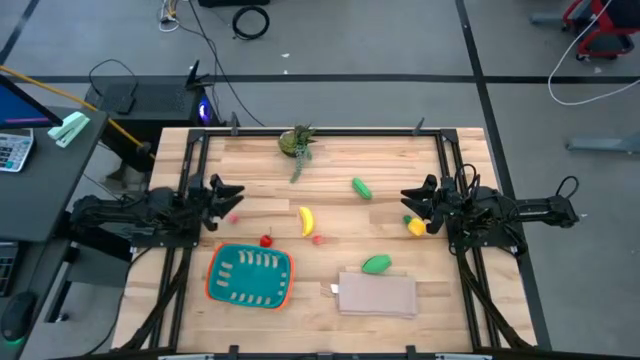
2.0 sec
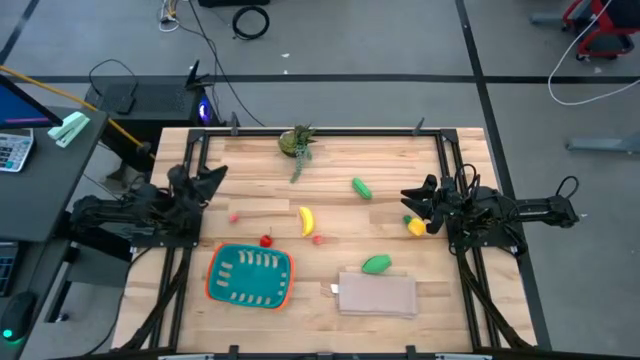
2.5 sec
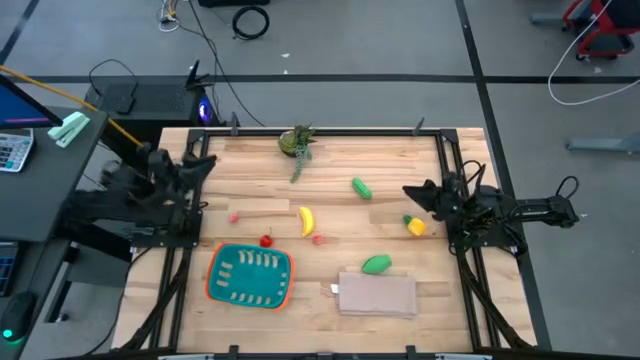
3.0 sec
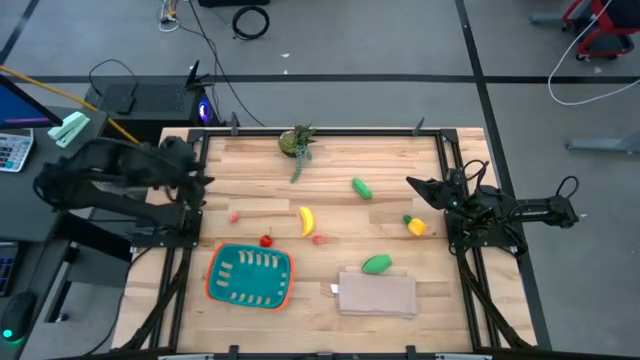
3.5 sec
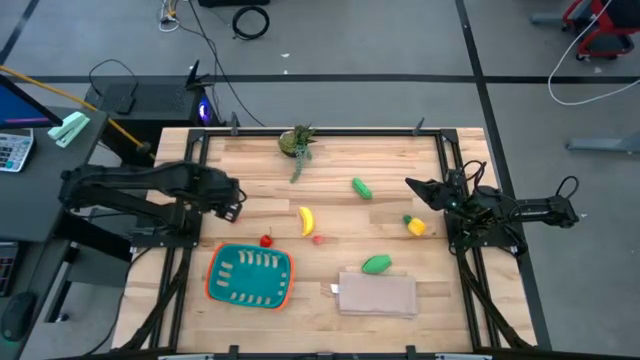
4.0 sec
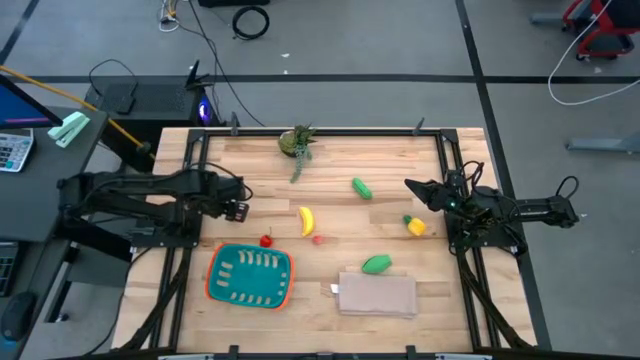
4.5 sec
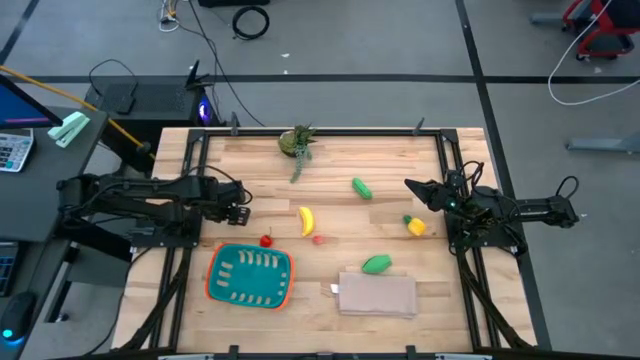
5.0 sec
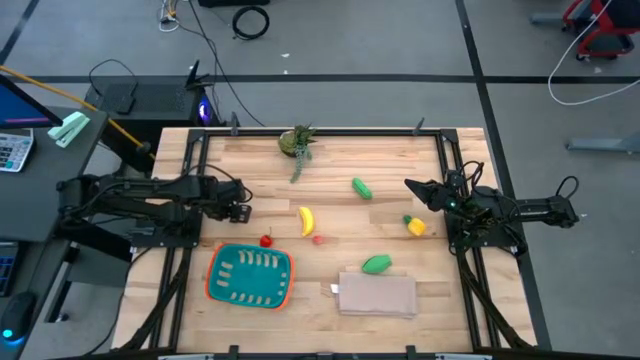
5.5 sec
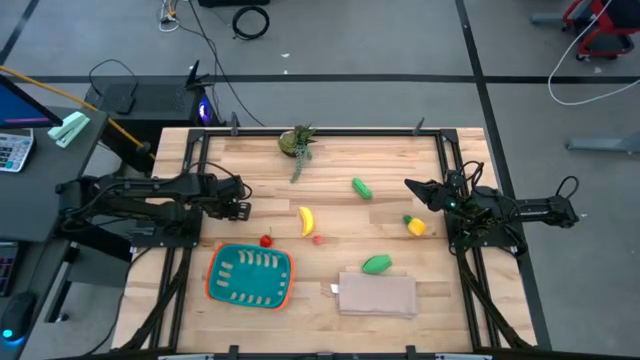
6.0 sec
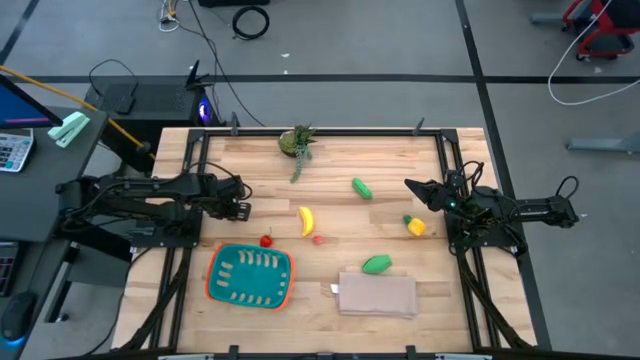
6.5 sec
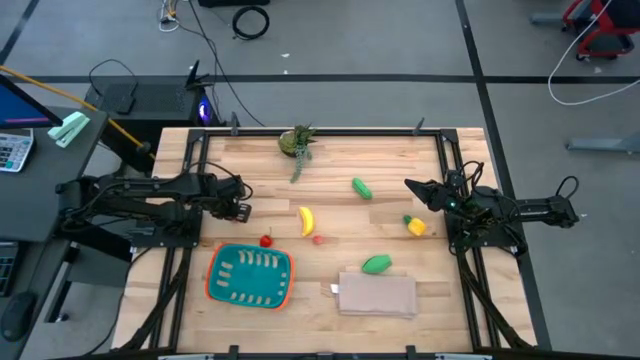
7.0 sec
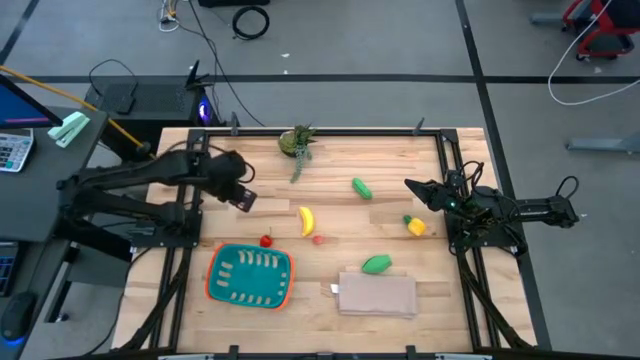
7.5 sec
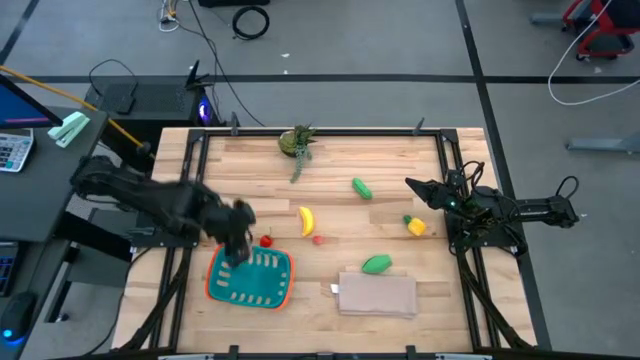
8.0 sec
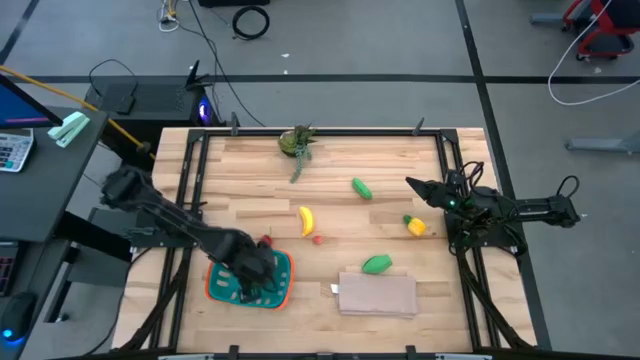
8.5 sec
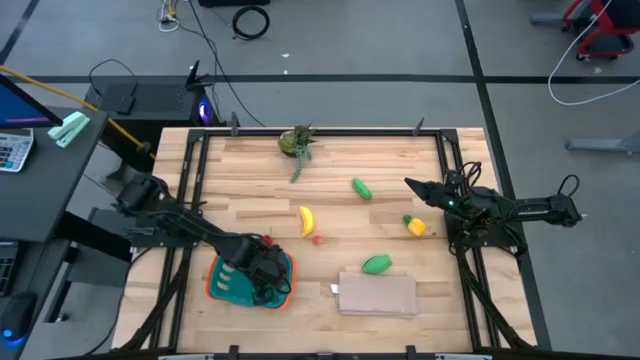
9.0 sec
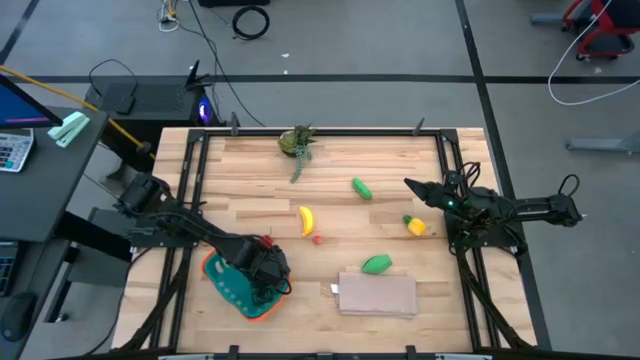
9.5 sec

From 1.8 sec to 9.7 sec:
Task: Pick and placing Produce into tupperware
Put the left pink apricot into the blue basket

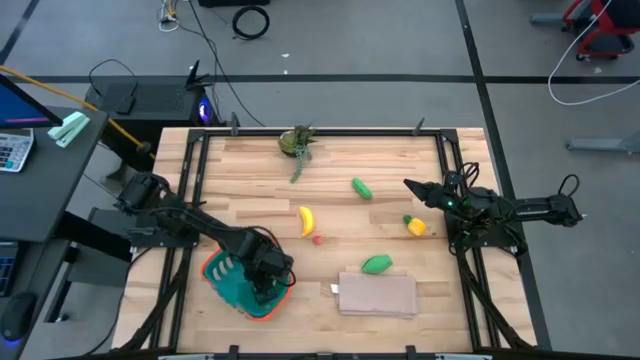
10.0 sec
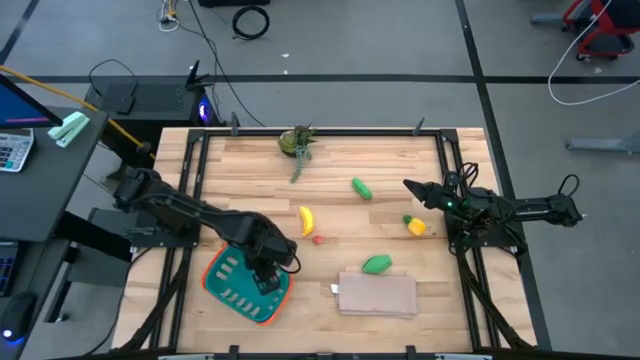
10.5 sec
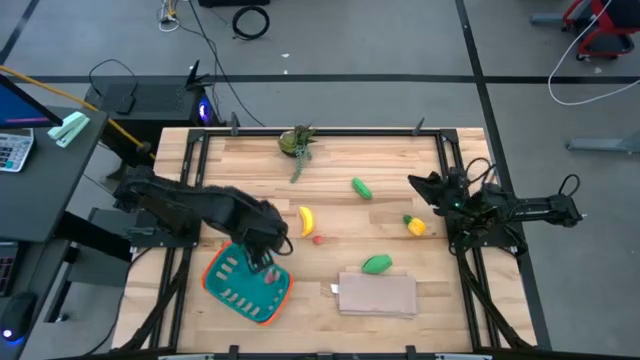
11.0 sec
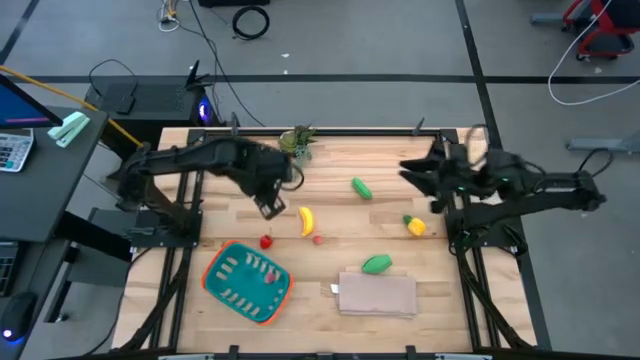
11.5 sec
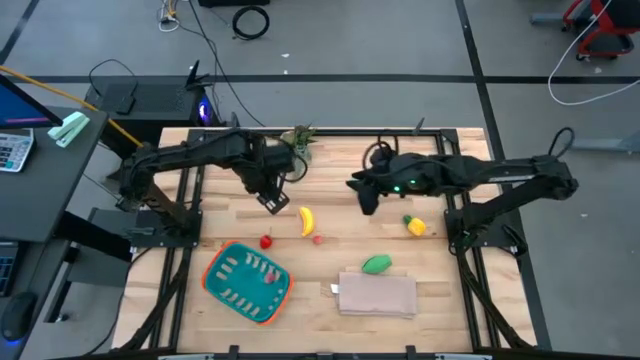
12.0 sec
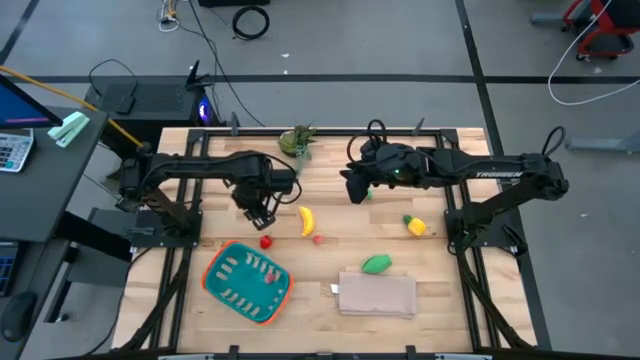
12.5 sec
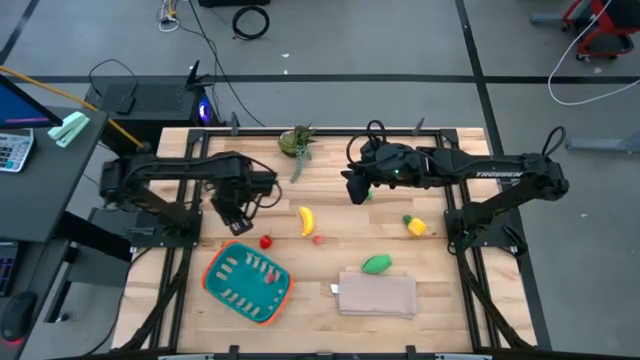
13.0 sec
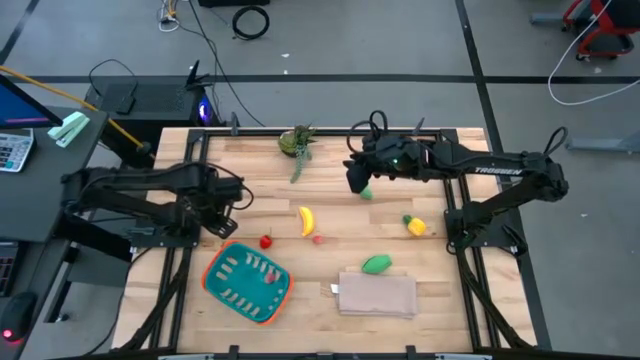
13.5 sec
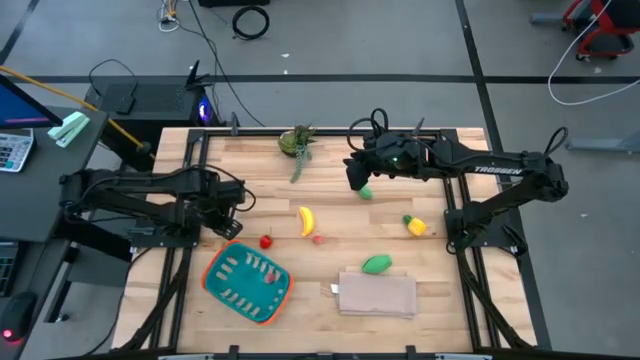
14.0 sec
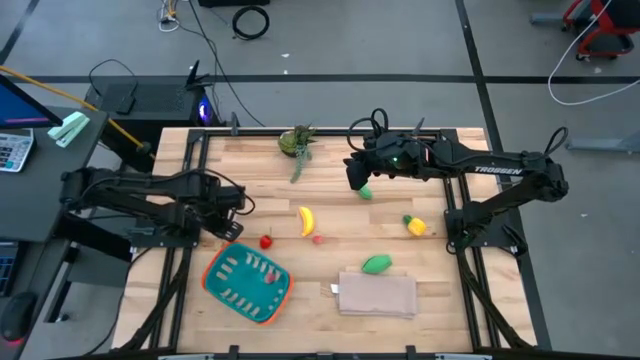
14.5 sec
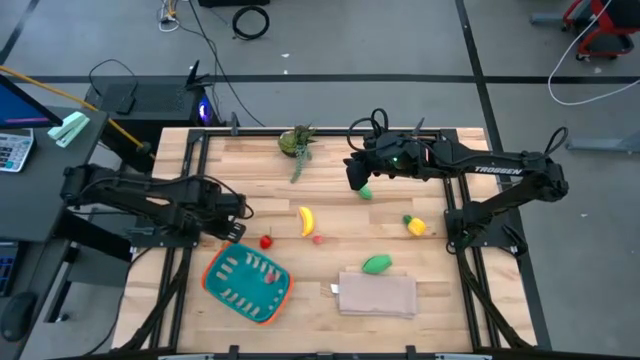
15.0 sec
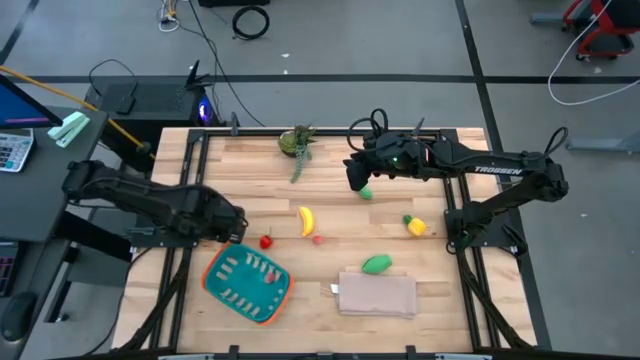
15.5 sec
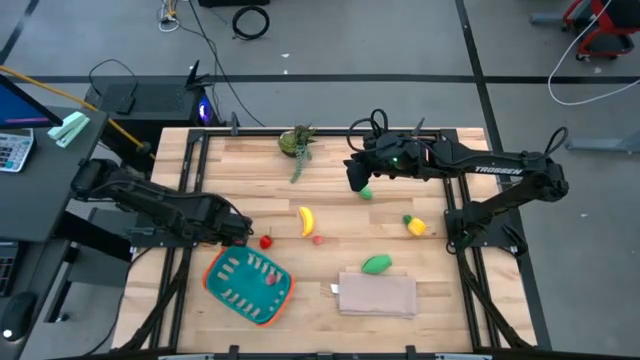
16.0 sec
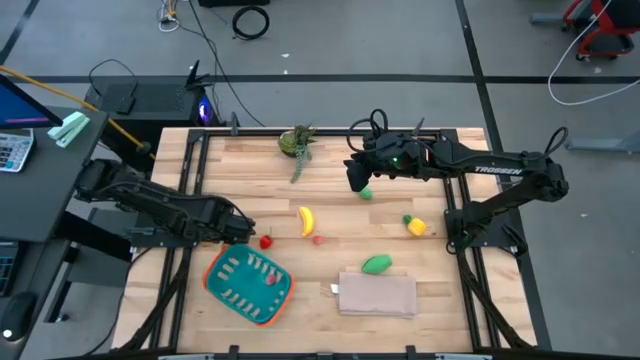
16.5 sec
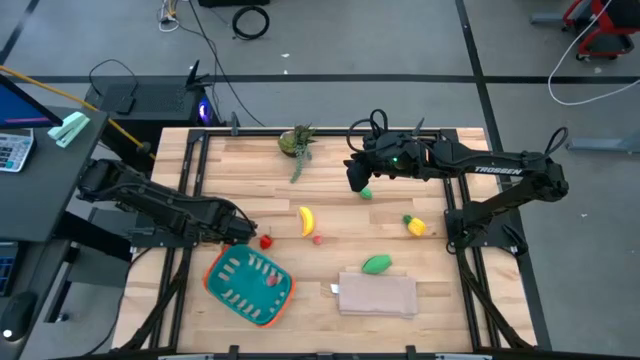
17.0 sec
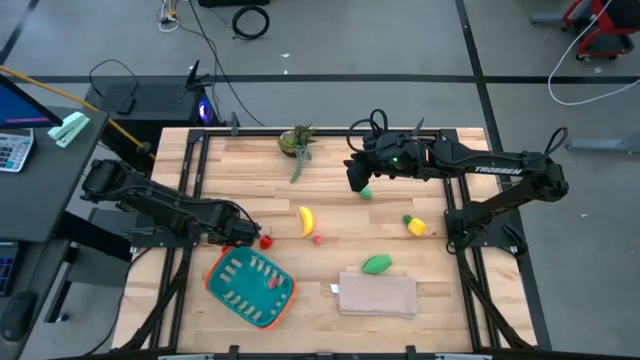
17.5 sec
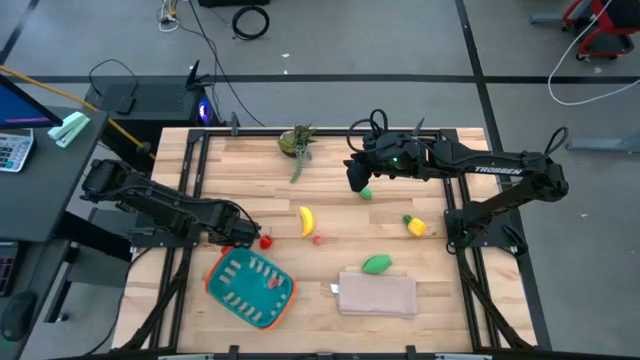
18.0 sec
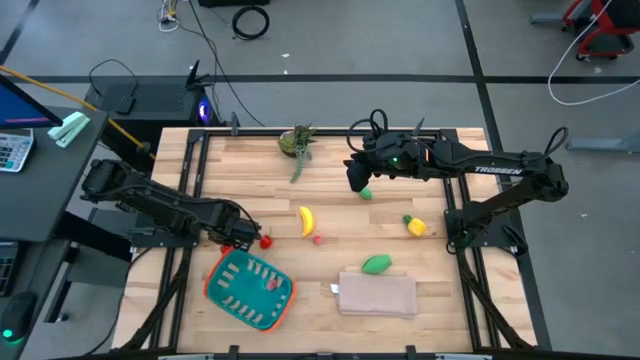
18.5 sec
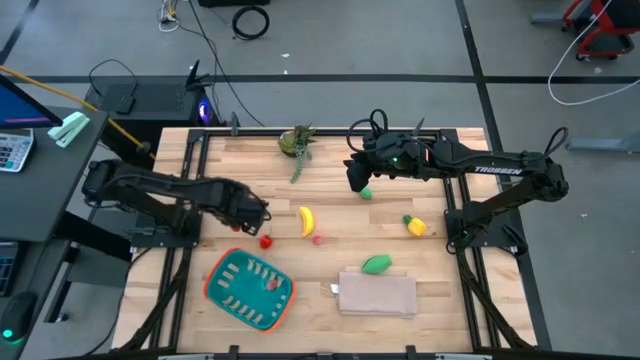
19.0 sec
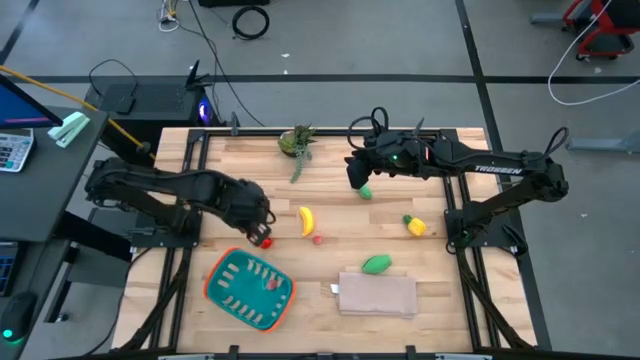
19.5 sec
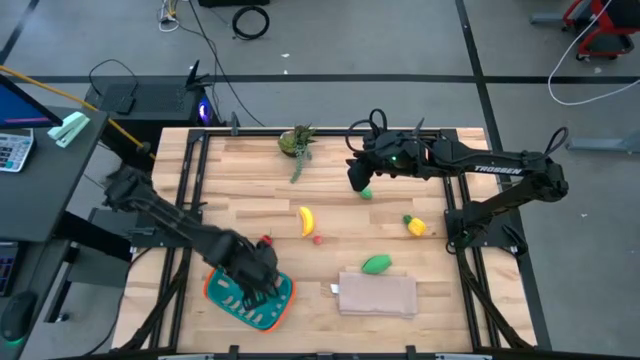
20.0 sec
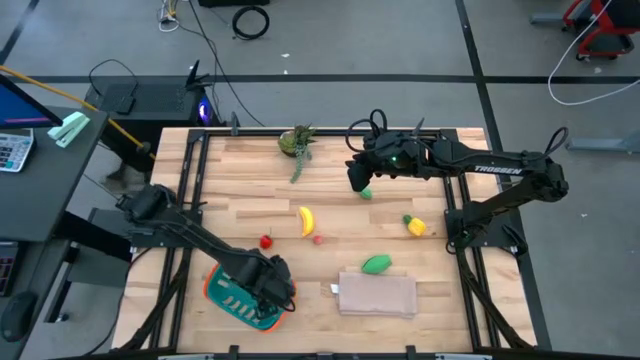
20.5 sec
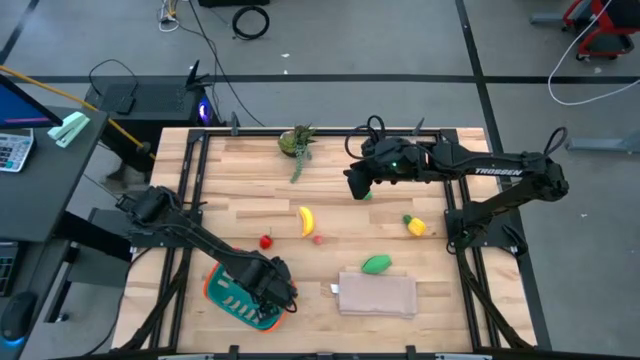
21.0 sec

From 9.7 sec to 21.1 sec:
Put the left red strawberry into the blue basket

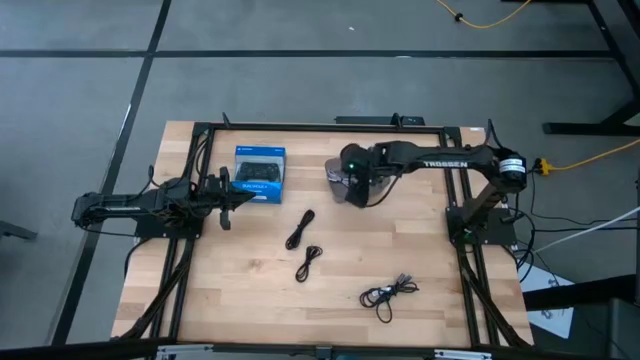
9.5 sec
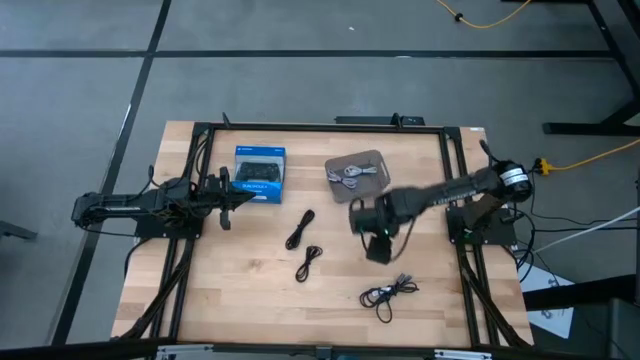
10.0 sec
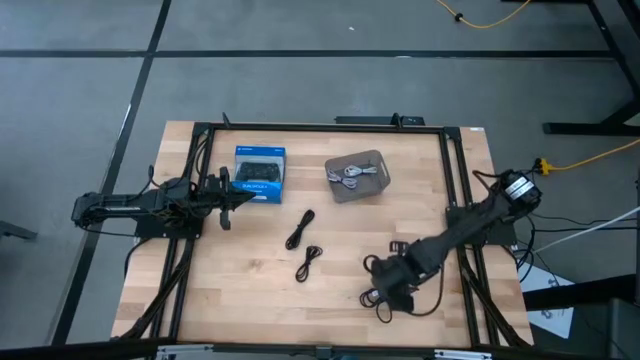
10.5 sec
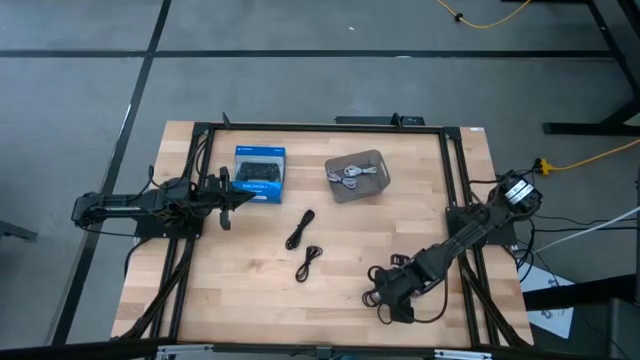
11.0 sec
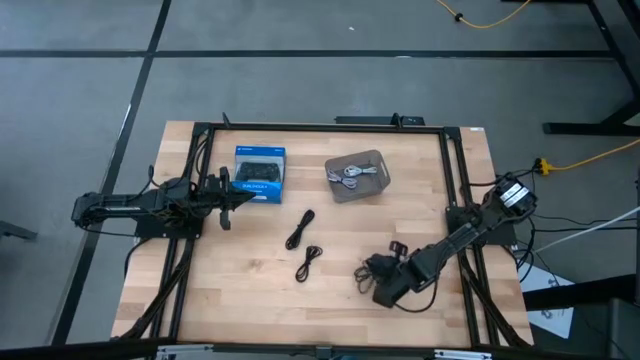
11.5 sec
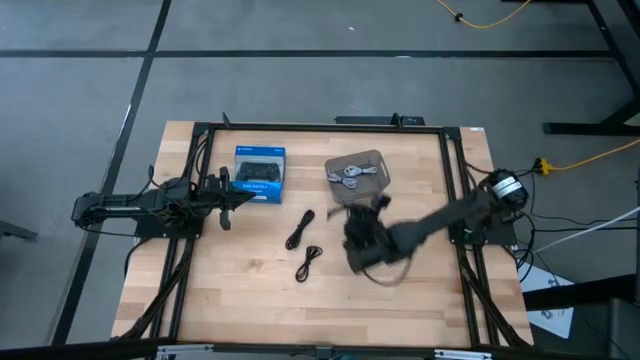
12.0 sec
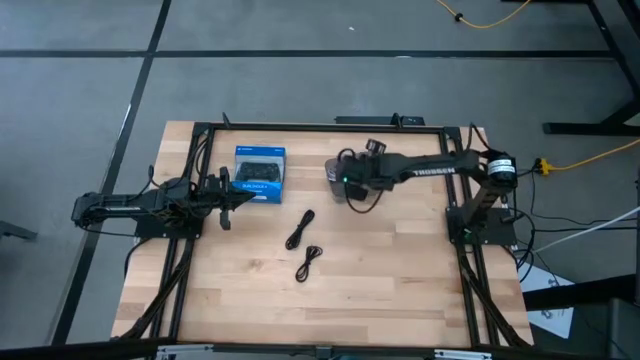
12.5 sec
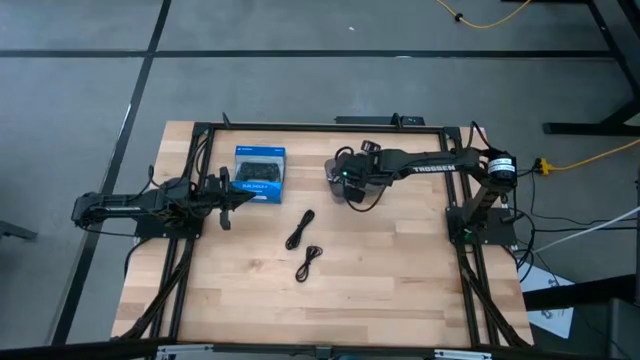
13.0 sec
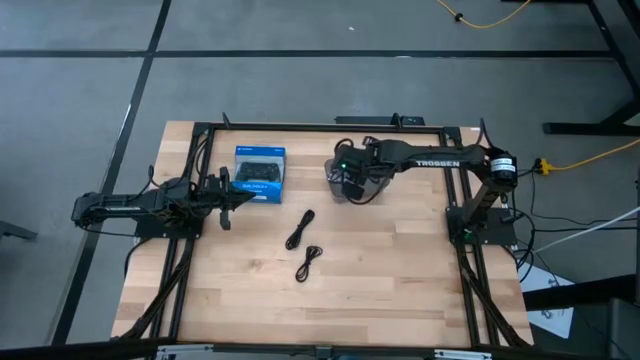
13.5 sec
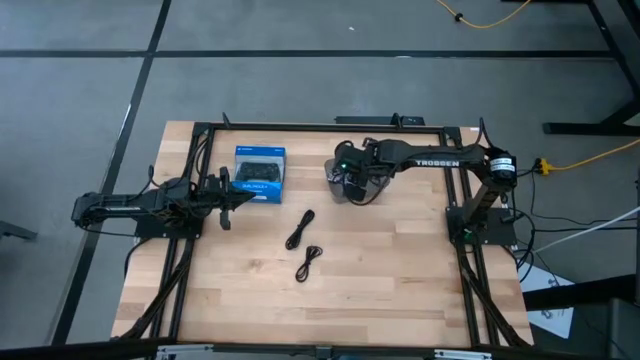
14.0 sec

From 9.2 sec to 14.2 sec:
Task: Pick and place USB-C Cables
Put the bottom black charger cable into the black bin
